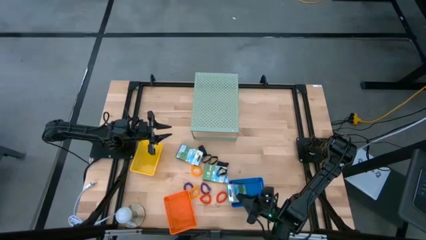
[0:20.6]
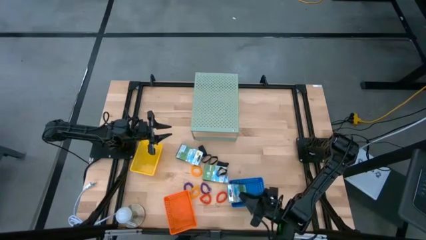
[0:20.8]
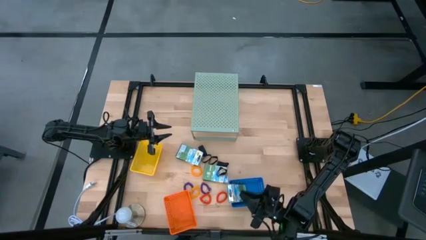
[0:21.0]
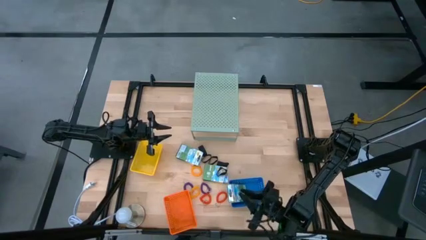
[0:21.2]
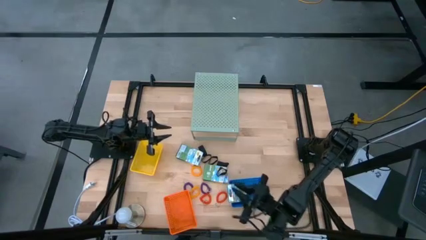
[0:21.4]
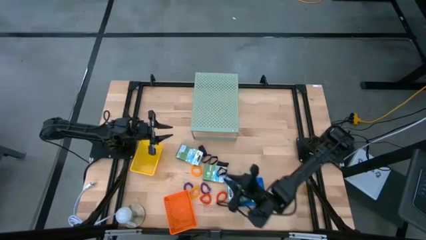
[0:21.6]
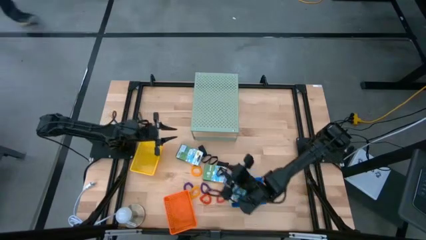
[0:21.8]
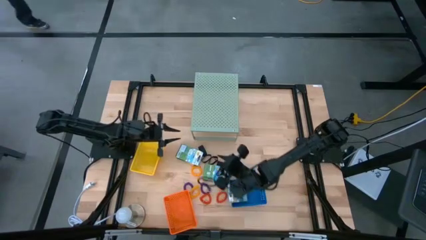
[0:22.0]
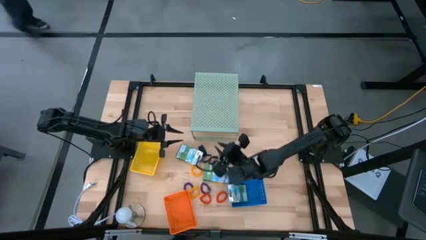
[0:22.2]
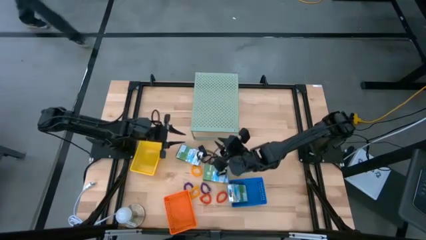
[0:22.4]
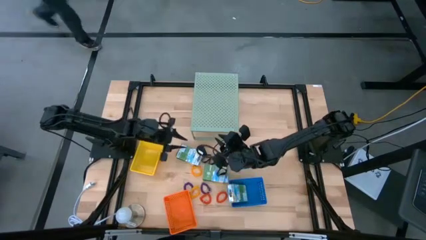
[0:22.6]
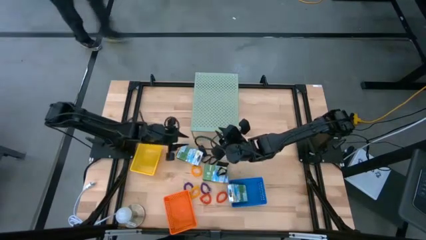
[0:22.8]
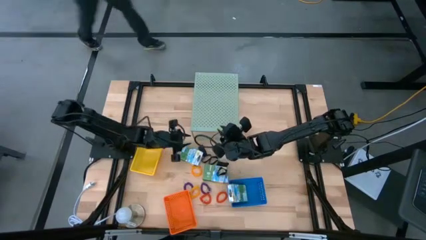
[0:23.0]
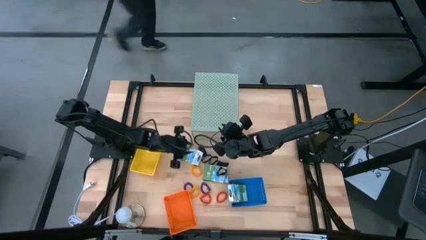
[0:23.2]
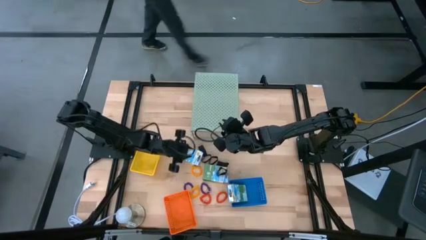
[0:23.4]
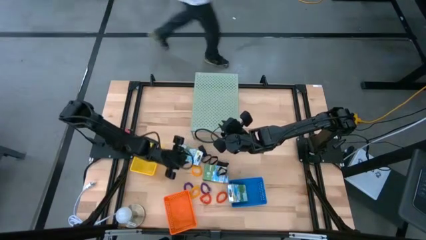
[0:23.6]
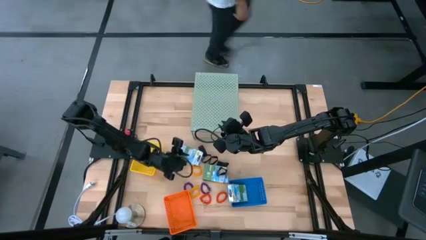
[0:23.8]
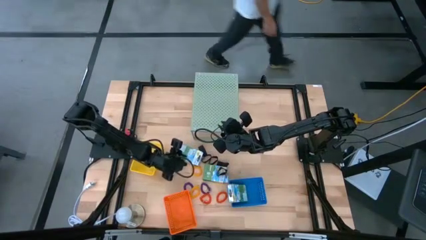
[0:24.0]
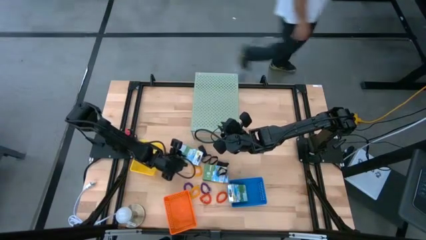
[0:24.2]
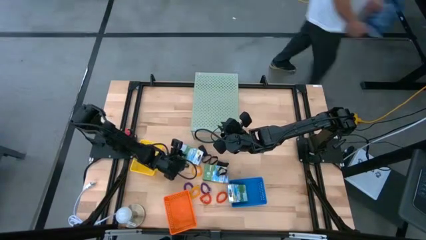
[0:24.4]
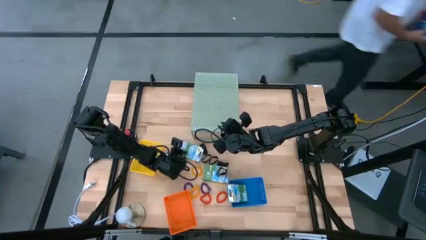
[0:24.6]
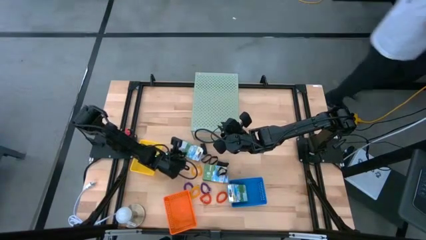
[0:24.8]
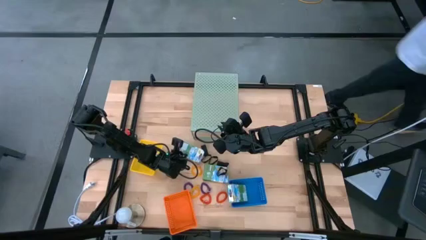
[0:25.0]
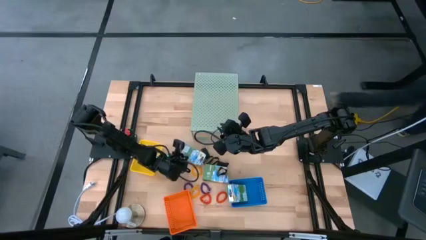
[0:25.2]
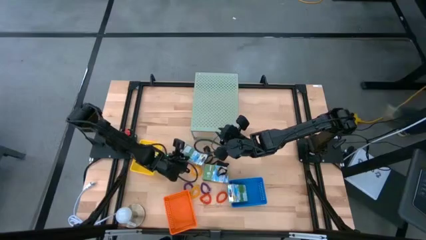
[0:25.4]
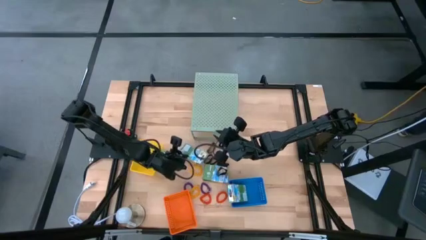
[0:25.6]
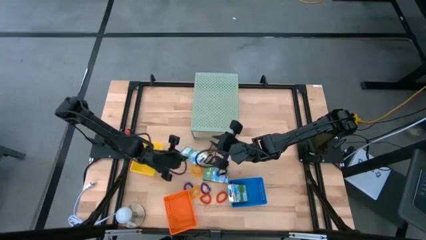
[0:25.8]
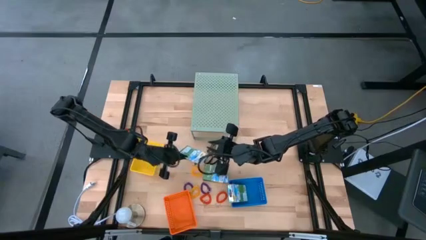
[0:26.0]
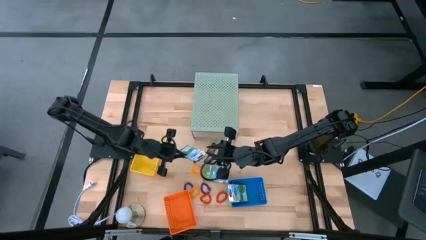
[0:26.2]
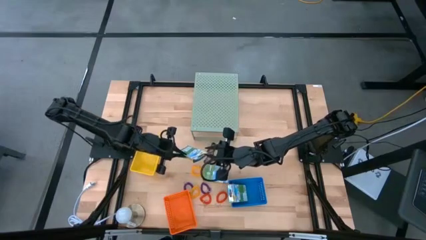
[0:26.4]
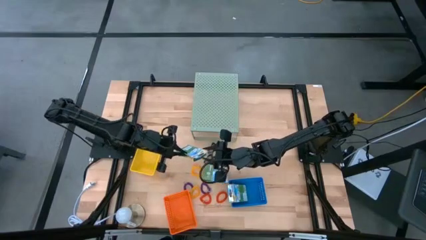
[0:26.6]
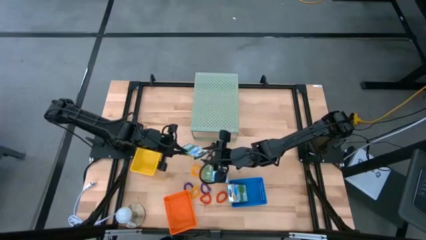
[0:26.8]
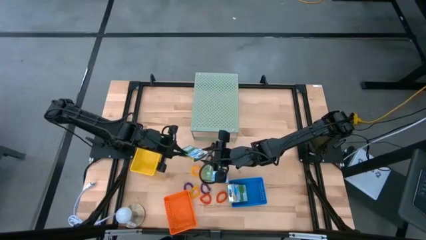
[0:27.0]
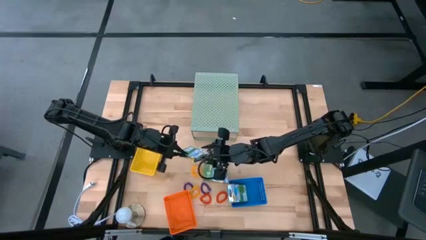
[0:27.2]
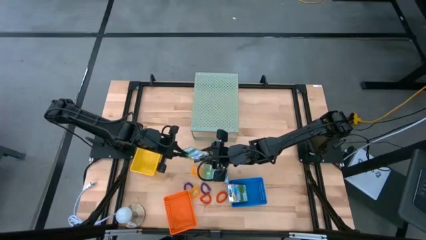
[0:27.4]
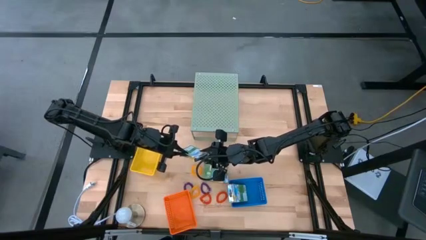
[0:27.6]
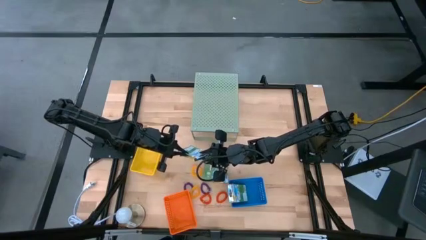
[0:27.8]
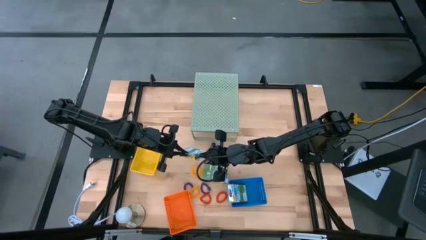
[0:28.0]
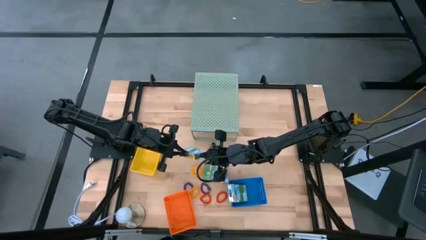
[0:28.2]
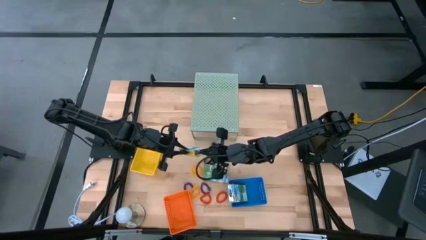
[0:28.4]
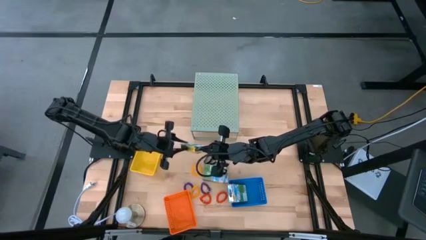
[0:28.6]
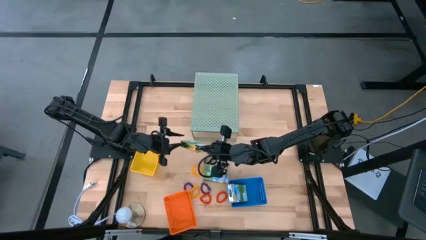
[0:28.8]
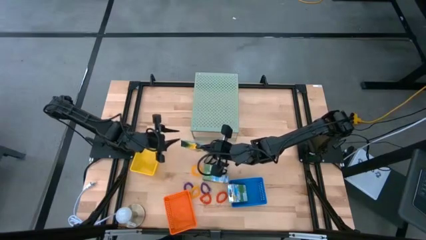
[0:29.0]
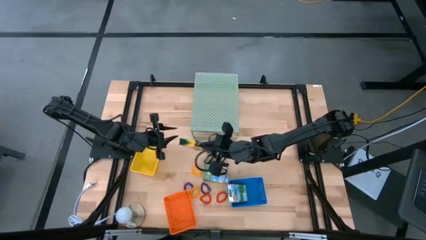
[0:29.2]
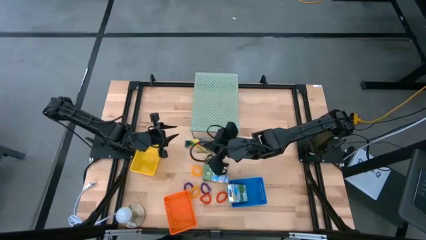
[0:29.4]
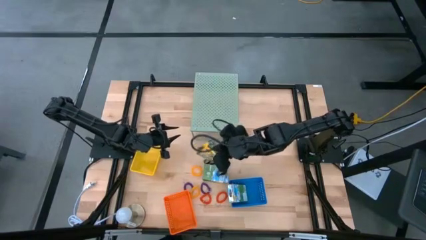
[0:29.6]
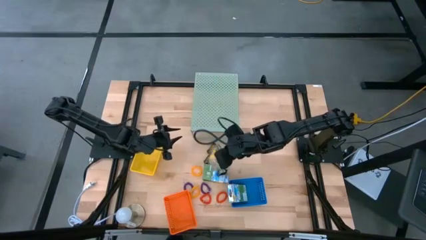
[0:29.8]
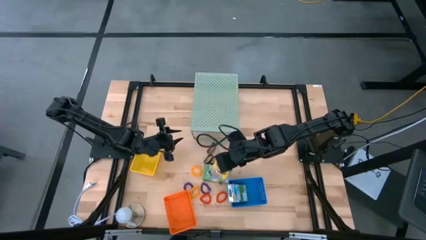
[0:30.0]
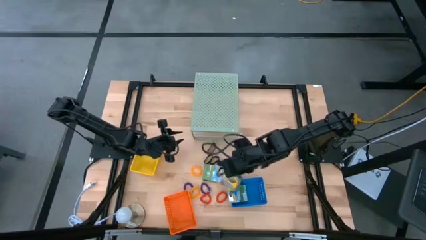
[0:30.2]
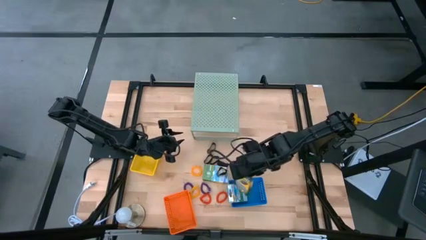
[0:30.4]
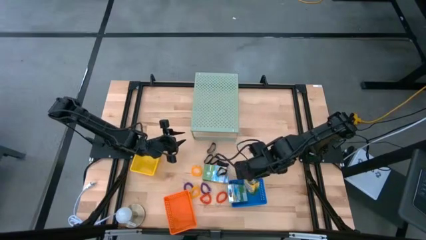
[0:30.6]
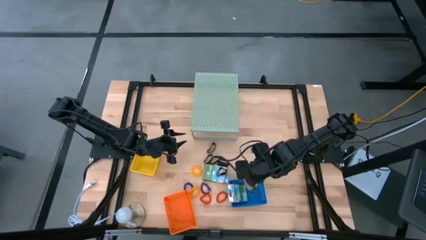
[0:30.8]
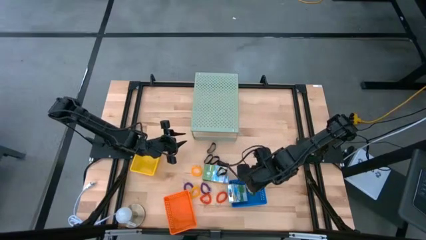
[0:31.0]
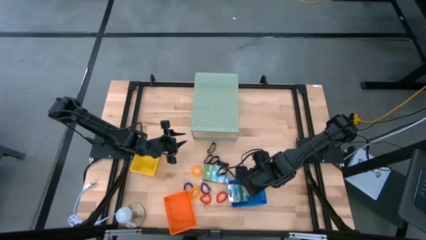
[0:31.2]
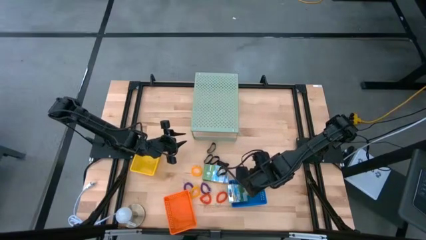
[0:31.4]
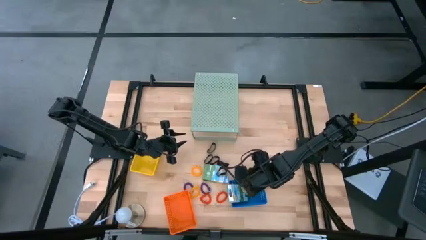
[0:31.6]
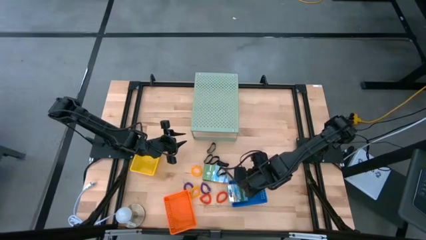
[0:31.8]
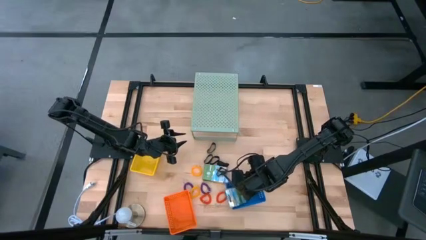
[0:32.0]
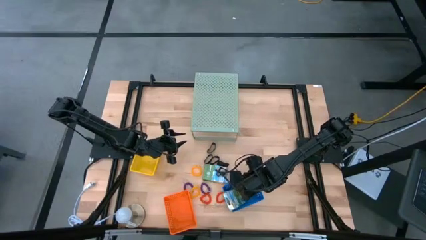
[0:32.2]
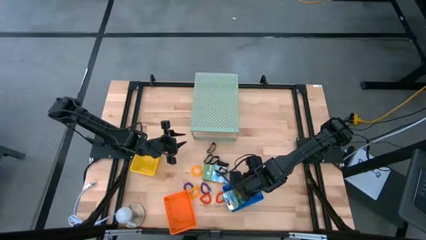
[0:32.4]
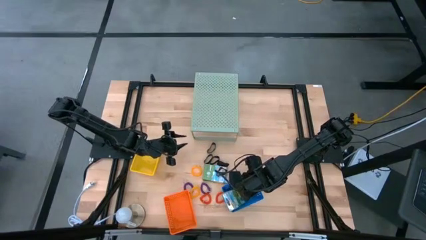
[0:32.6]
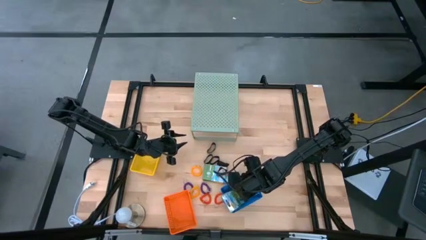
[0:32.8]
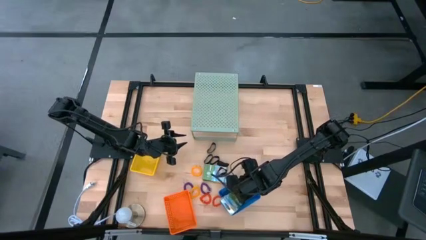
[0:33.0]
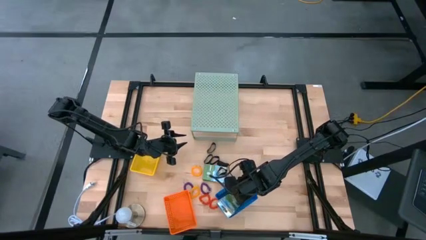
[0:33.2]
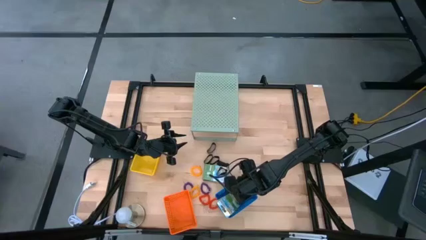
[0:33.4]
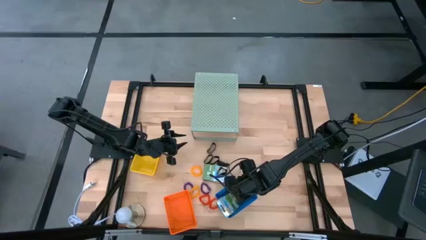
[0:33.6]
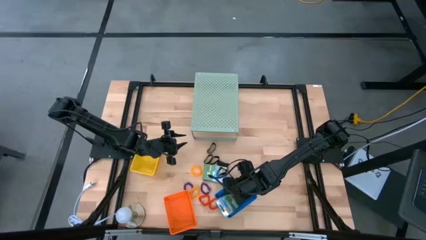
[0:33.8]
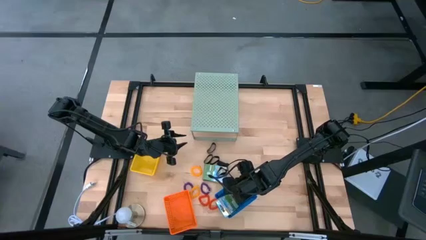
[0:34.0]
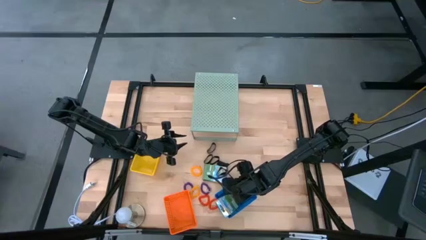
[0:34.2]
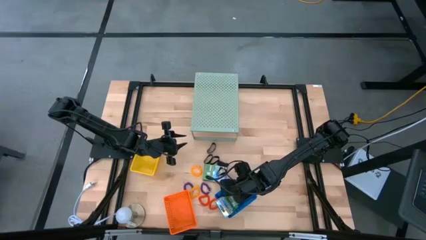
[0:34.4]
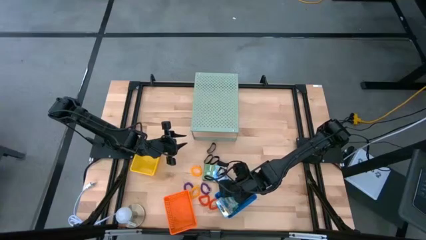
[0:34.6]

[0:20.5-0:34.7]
Task: Pick & Place Office Desk Supplies
Put the crayon box into the blue bin
